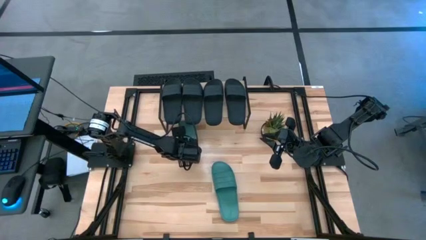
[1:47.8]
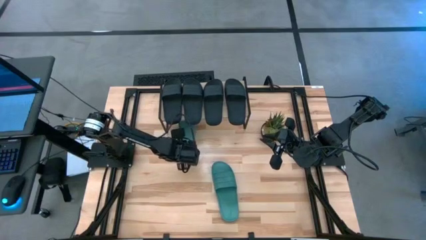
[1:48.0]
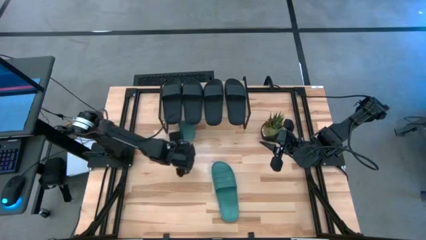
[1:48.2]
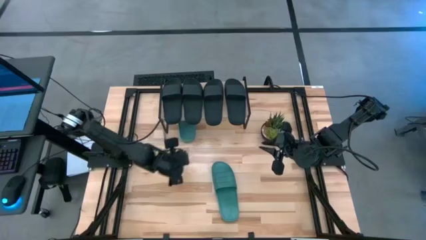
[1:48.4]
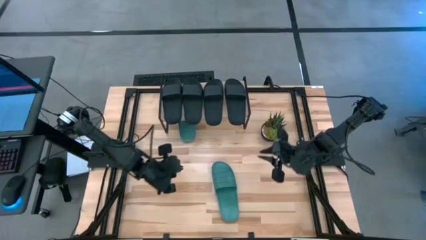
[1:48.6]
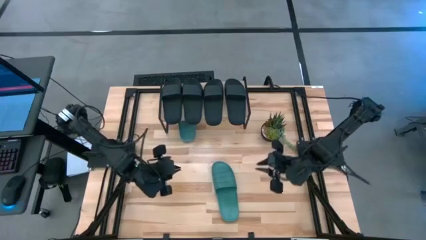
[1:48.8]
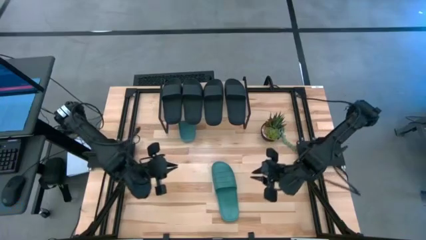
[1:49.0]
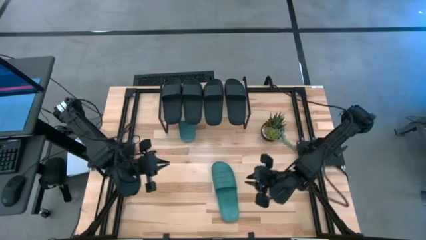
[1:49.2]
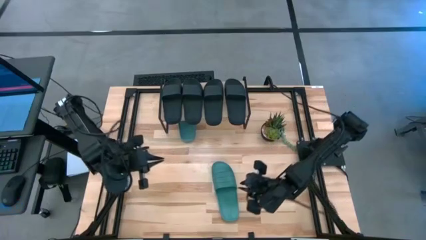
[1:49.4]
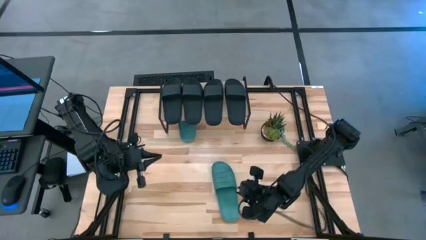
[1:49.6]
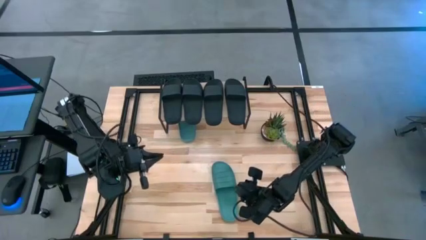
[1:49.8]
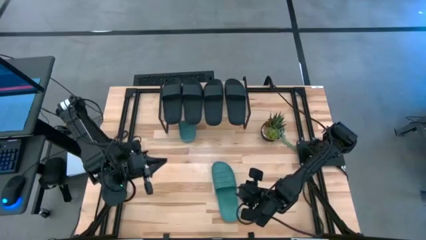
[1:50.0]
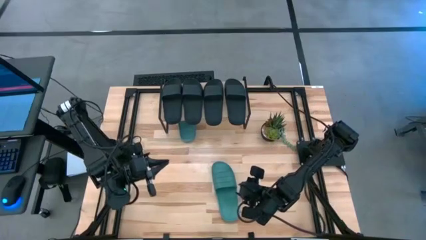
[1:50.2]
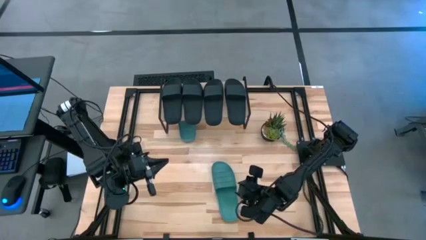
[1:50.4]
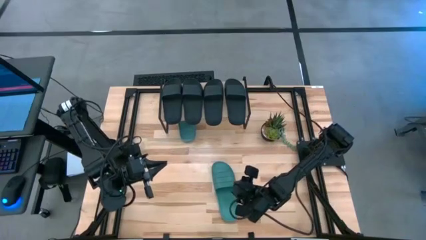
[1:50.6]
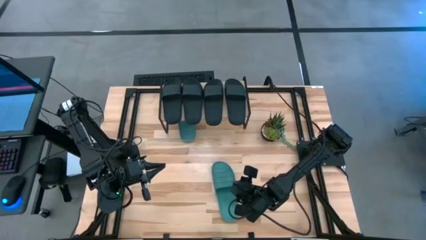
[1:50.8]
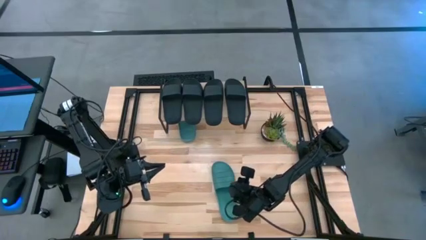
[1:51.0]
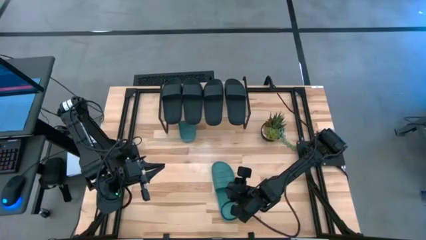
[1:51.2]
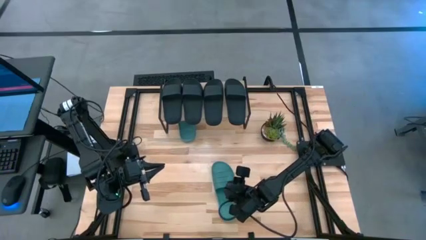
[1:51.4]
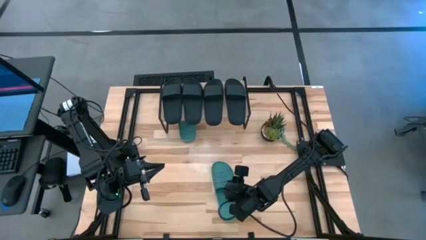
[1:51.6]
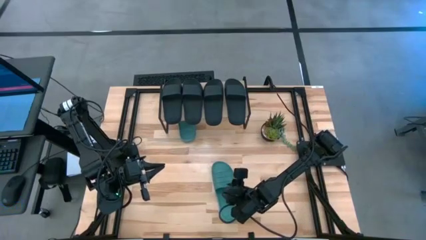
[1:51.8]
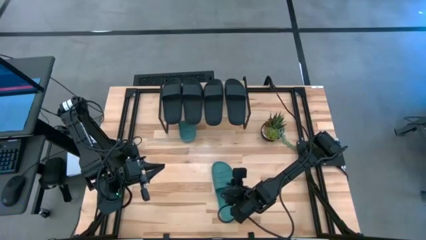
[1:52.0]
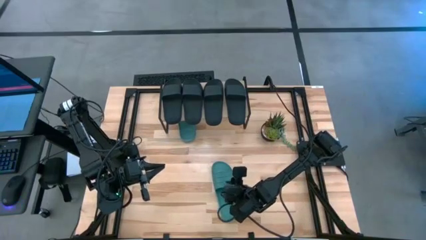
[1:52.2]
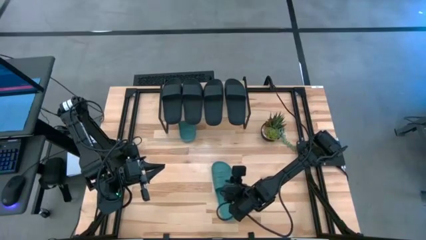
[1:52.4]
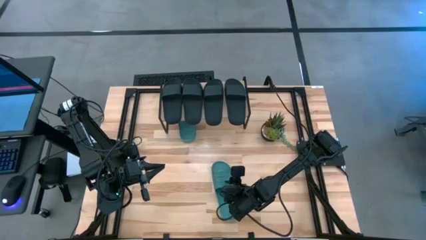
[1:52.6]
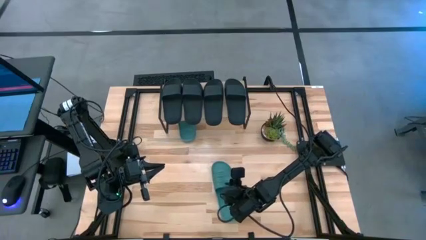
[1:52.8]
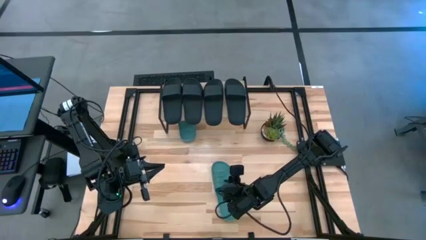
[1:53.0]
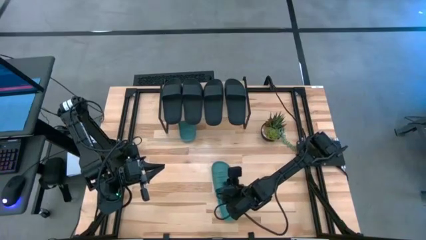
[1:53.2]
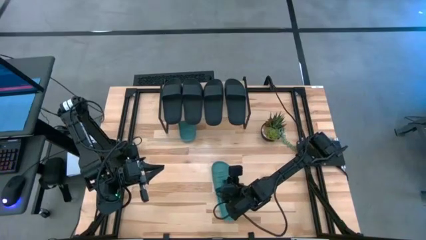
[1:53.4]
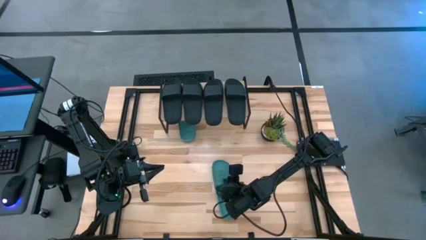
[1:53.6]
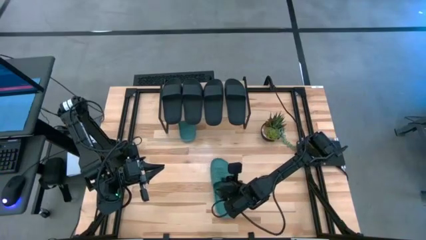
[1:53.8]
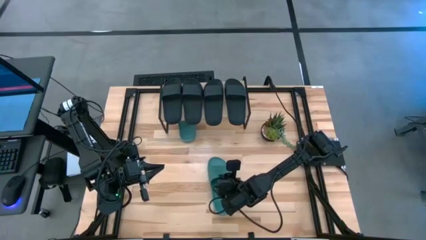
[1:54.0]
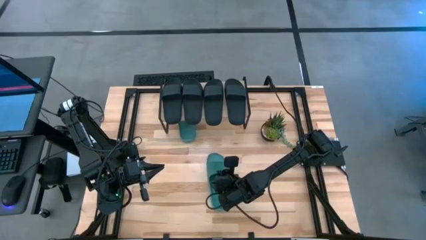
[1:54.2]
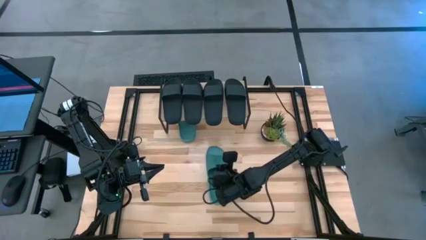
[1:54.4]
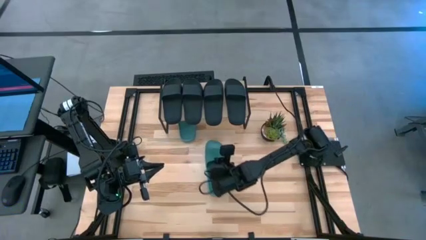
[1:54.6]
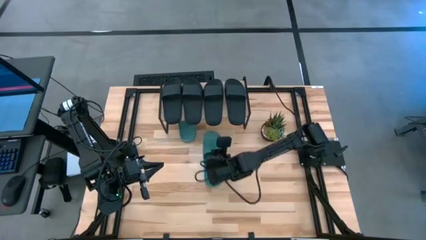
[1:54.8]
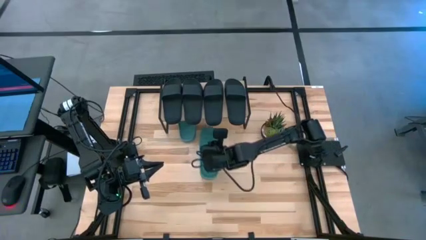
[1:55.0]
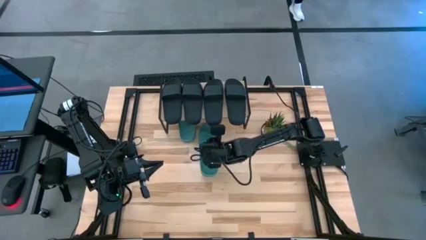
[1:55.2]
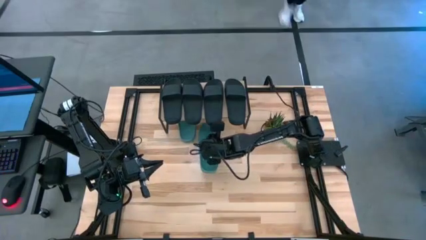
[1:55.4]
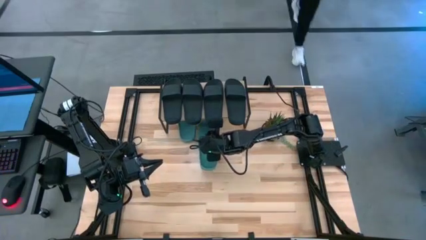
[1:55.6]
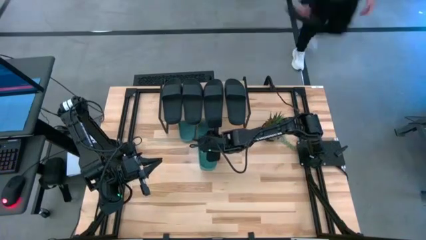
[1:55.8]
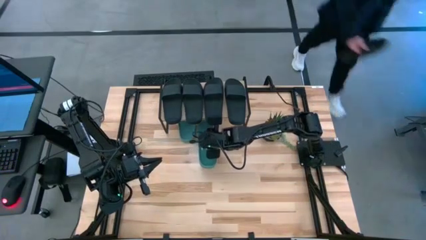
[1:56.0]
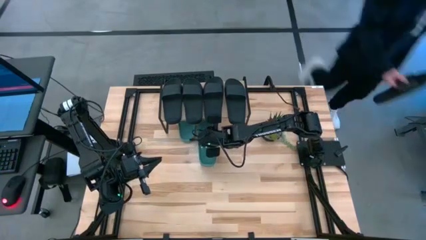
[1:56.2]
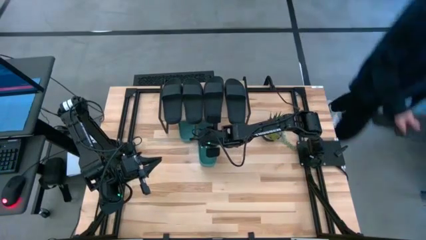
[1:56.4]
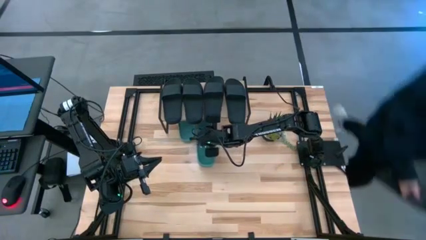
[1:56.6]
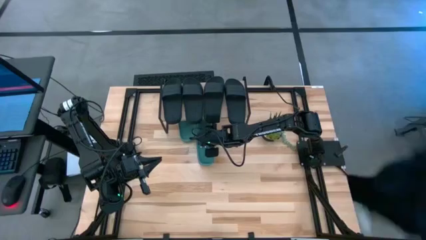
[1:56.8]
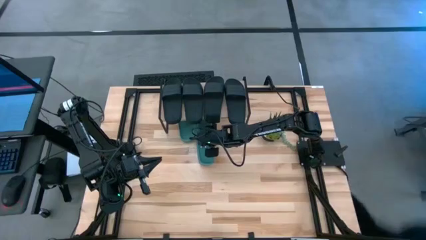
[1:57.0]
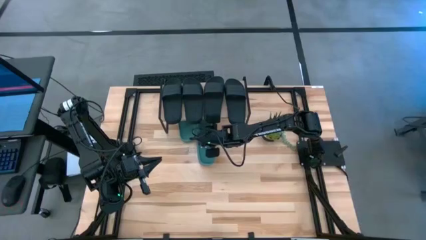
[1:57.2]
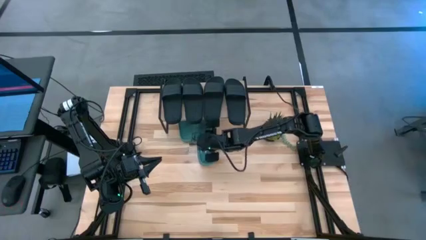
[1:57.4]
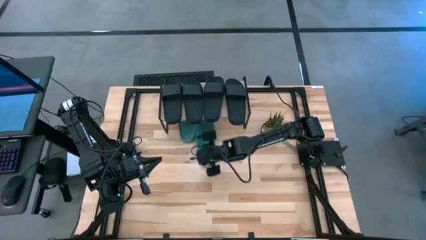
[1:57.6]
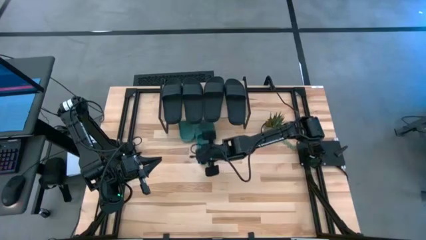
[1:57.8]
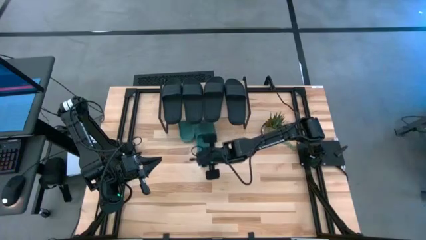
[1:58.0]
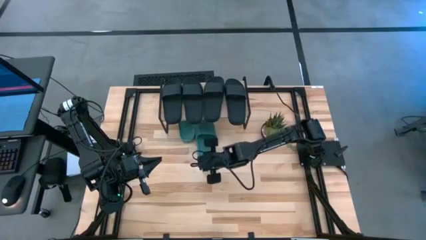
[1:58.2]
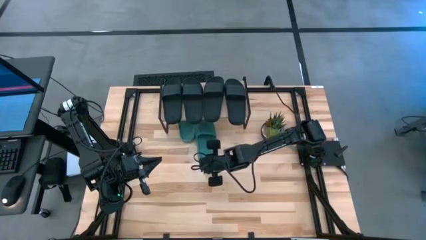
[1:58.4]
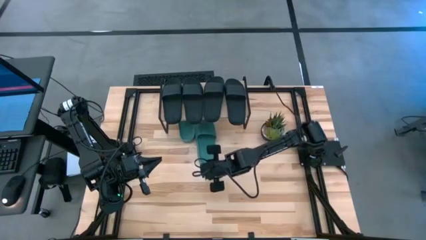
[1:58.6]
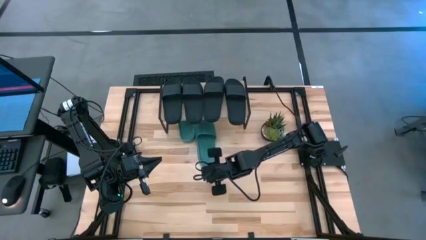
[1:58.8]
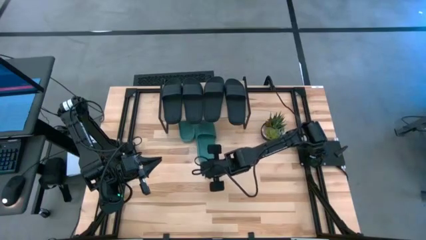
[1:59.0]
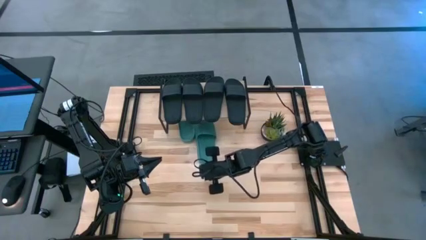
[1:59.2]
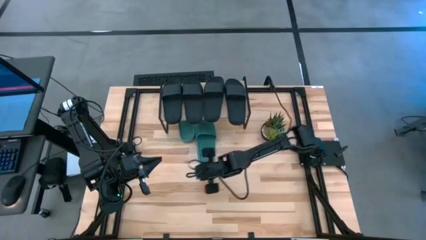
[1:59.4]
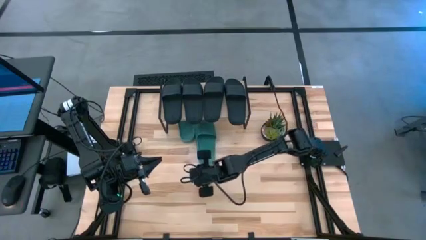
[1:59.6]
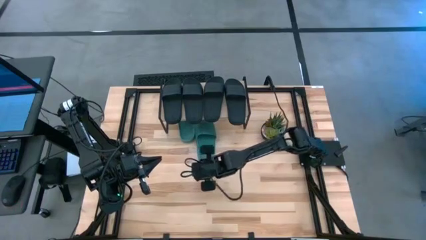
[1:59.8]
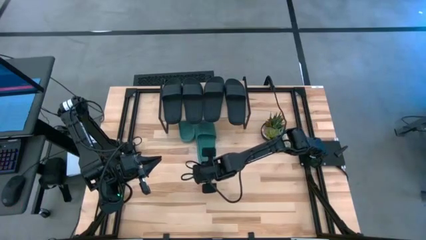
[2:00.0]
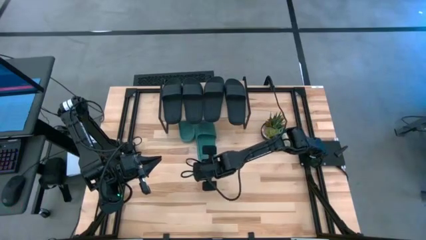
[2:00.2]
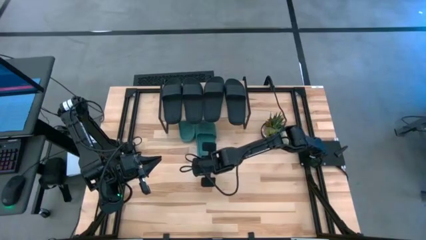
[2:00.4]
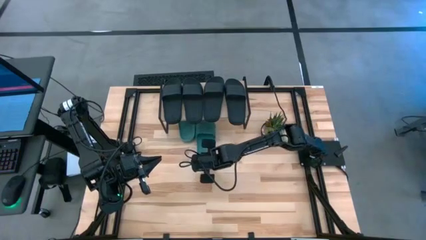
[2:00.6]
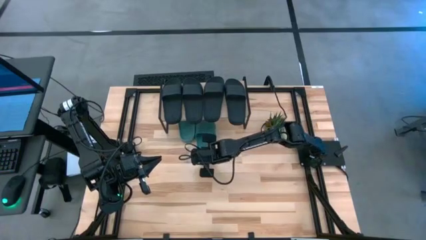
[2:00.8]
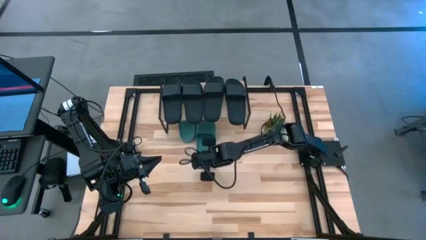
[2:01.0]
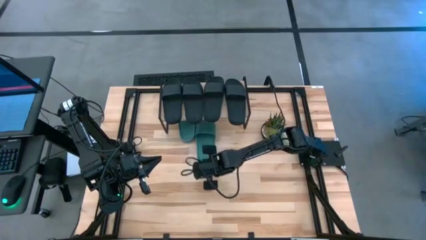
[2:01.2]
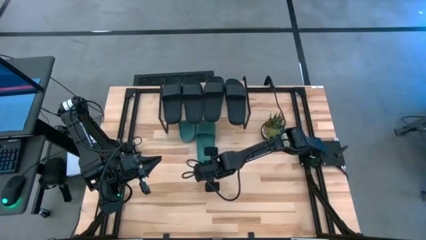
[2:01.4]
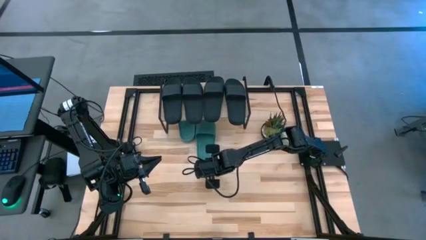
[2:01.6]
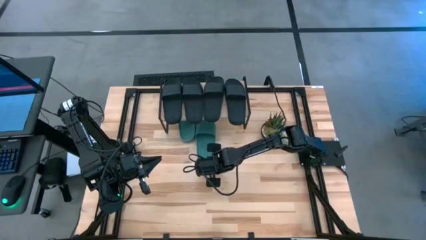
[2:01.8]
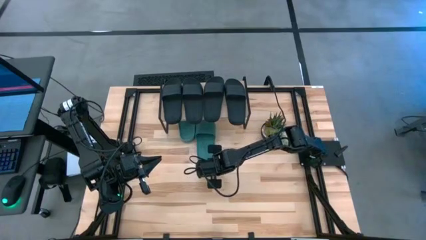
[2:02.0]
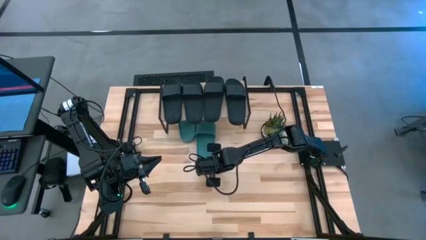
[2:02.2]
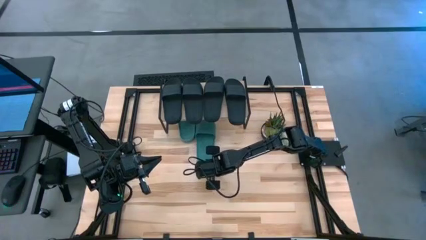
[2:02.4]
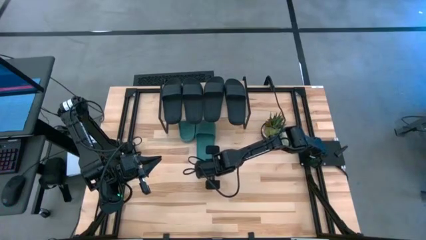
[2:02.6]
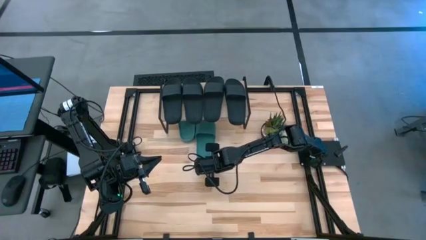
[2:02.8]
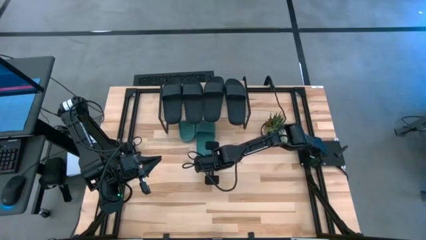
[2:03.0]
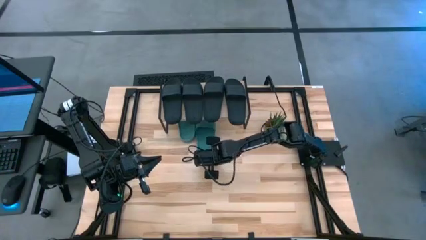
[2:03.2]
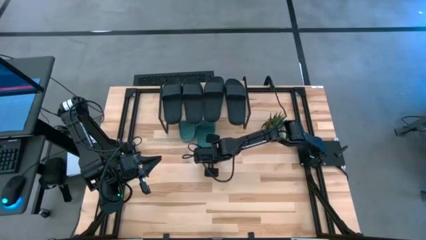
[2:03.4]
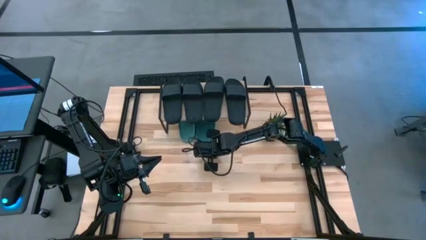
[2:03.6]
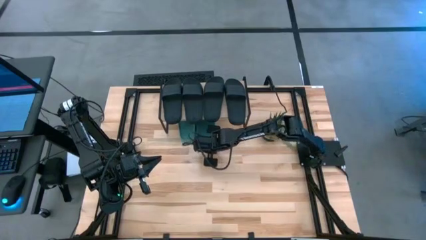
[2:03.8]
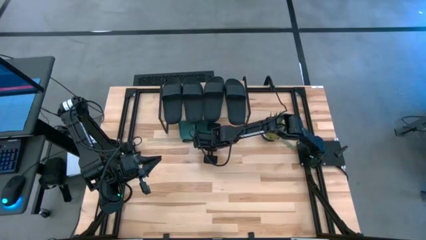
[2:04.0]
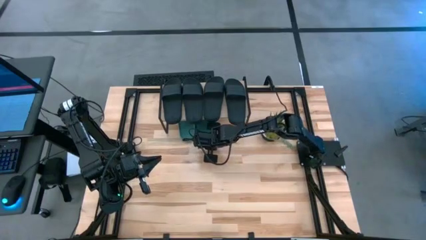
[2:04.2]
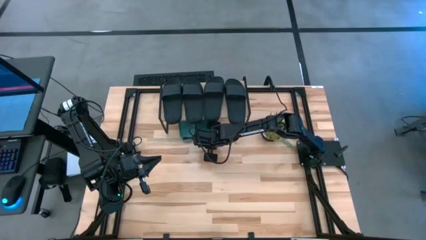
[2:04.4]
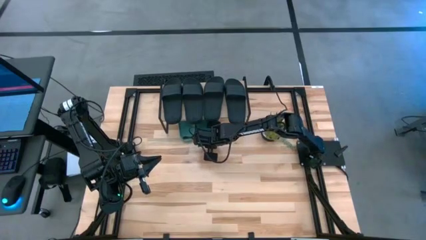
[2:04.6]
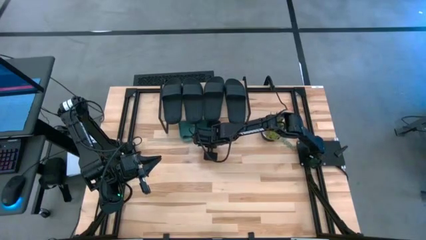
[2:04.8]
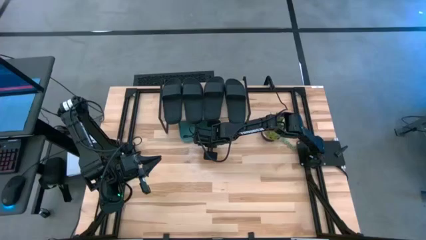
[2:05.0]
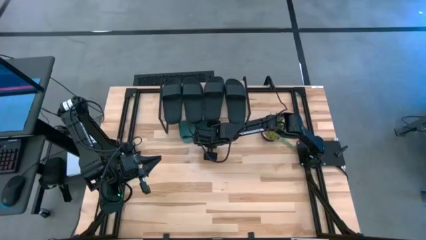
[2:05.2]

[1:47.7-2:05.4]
Task: Pick and place slides into the shelf
Put the green slide under the shelf
